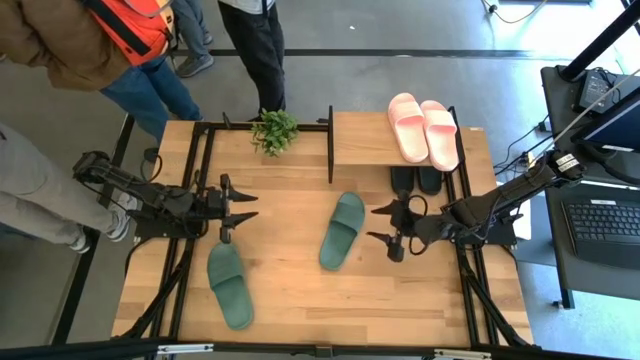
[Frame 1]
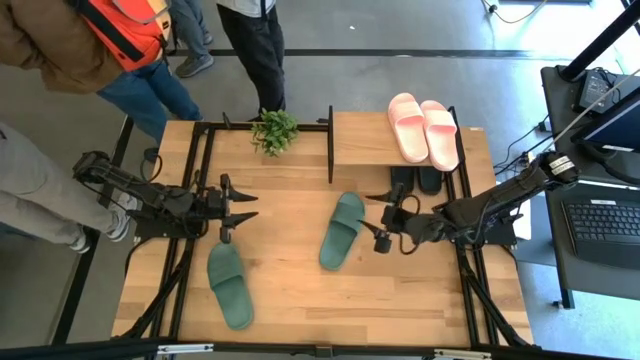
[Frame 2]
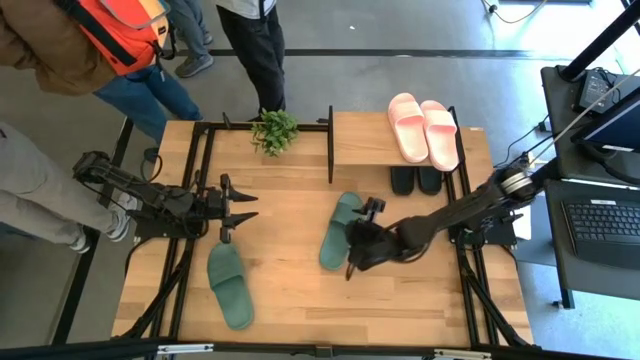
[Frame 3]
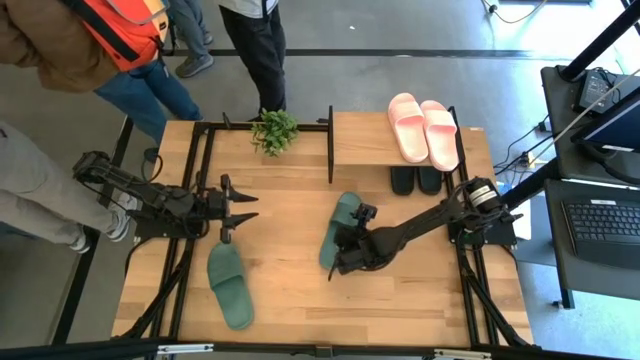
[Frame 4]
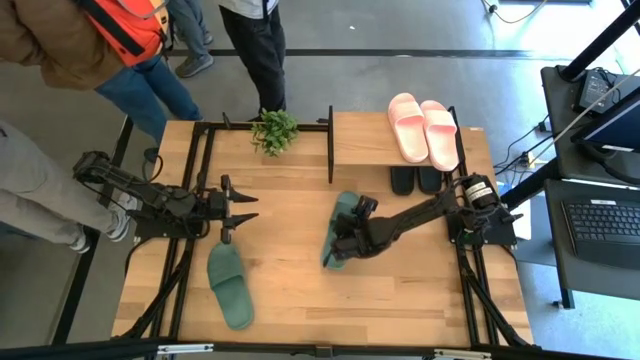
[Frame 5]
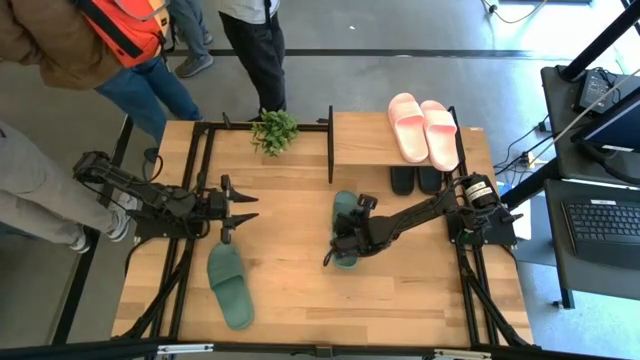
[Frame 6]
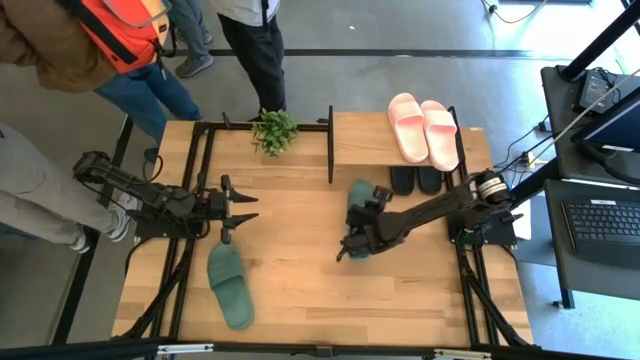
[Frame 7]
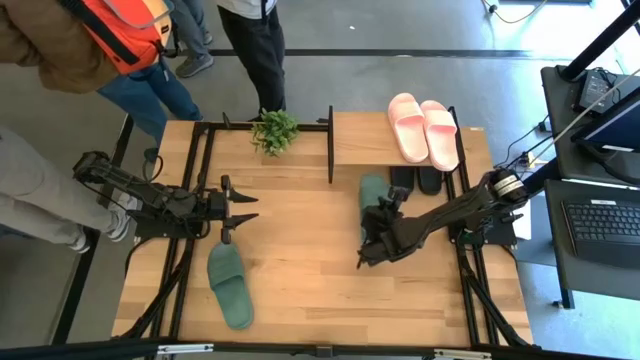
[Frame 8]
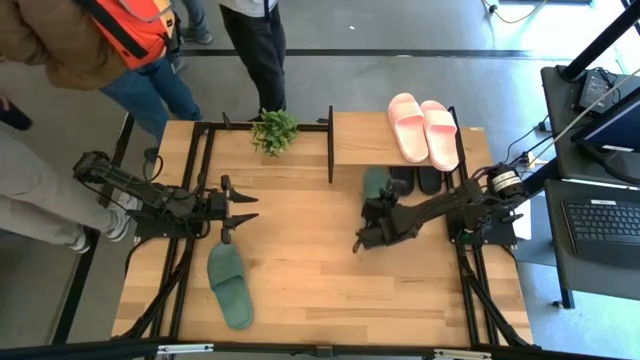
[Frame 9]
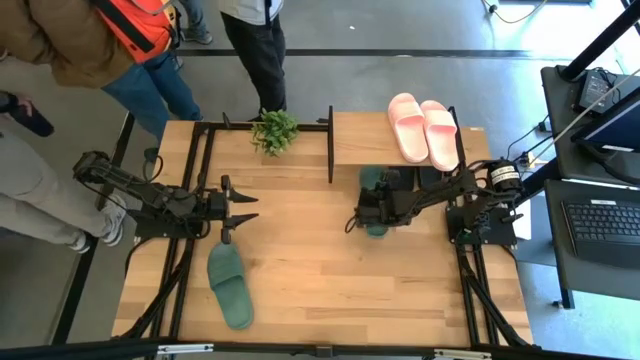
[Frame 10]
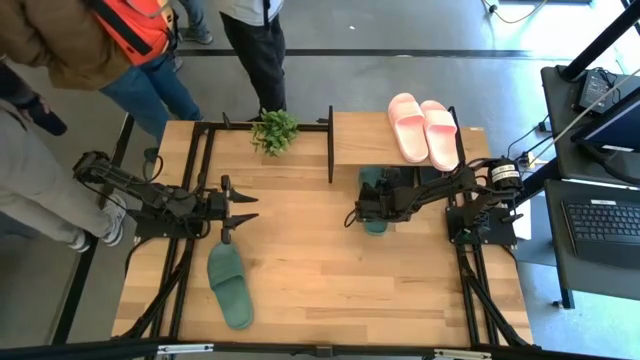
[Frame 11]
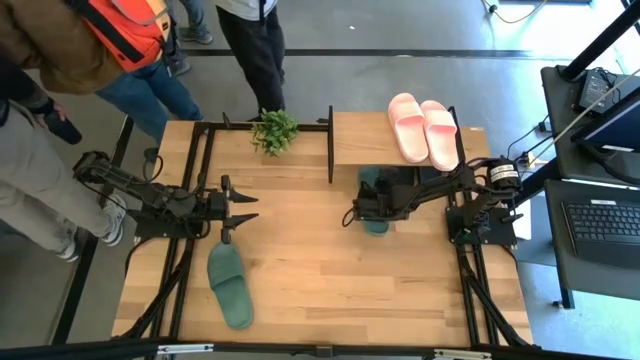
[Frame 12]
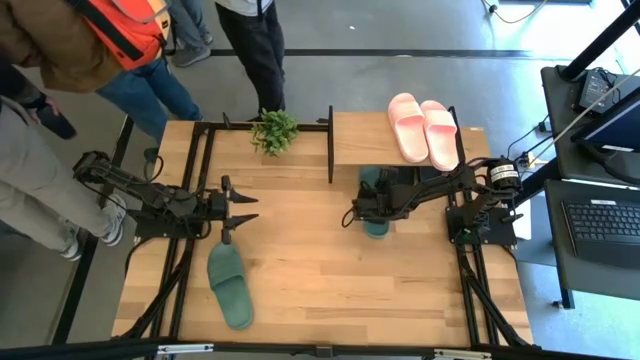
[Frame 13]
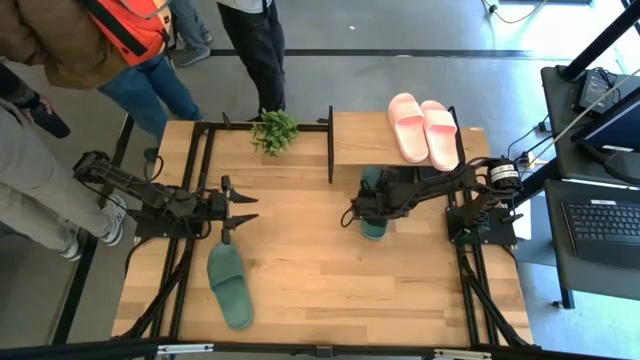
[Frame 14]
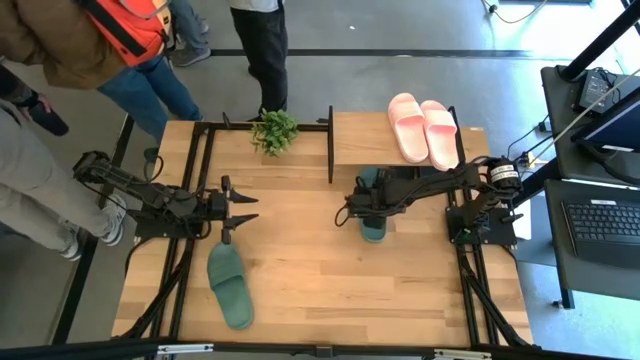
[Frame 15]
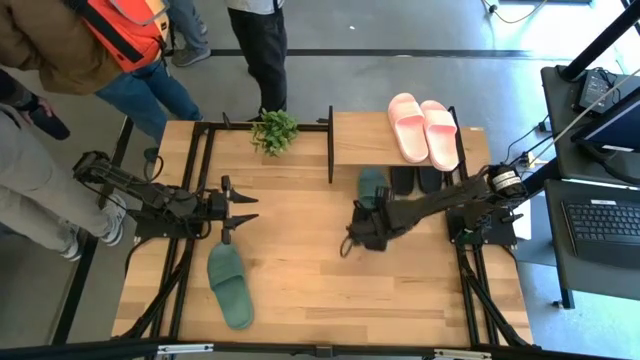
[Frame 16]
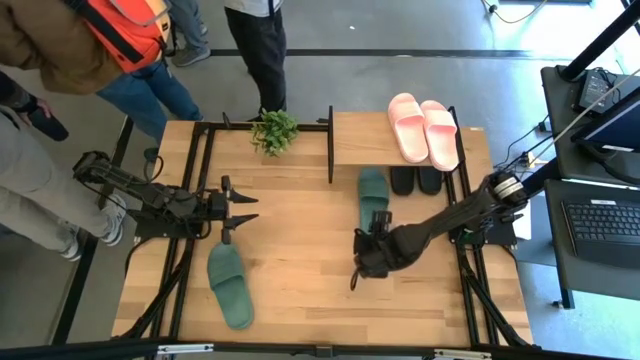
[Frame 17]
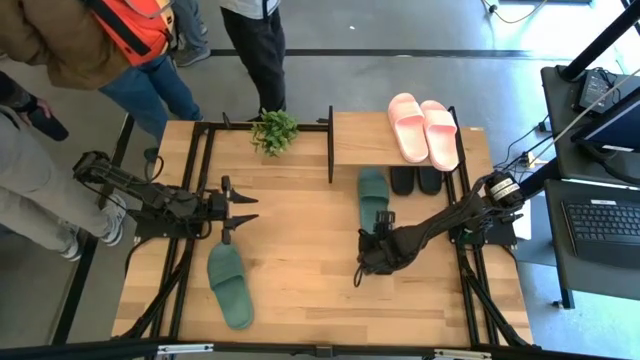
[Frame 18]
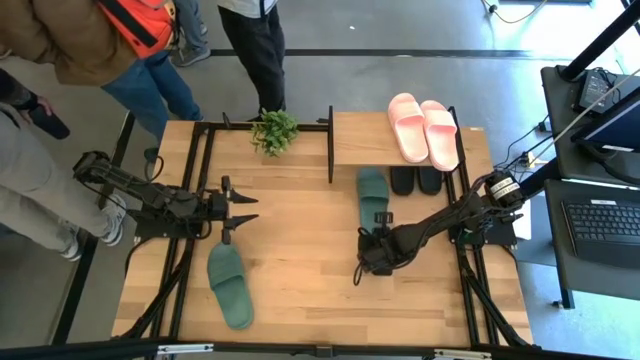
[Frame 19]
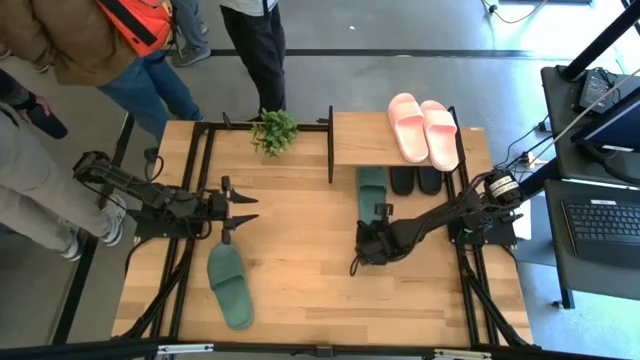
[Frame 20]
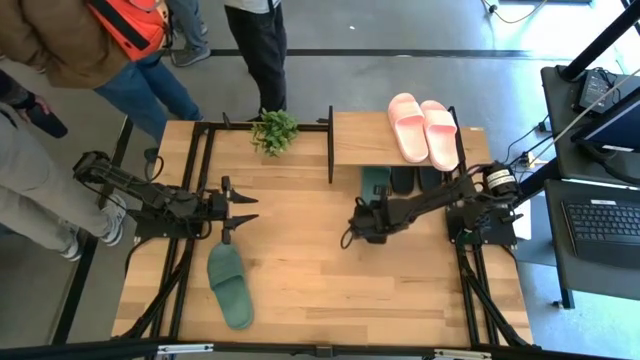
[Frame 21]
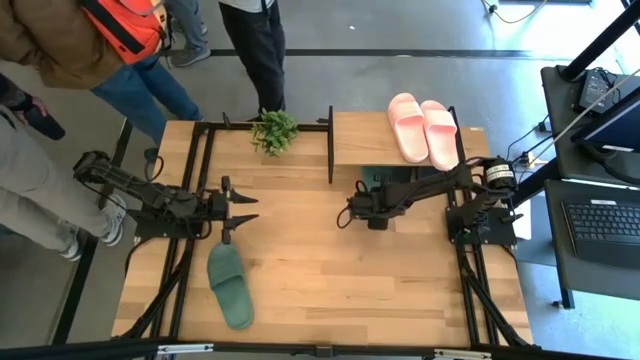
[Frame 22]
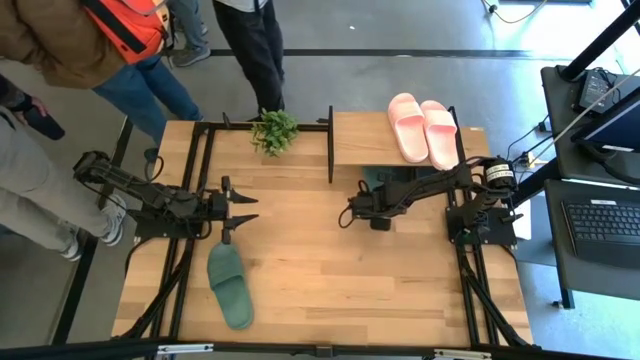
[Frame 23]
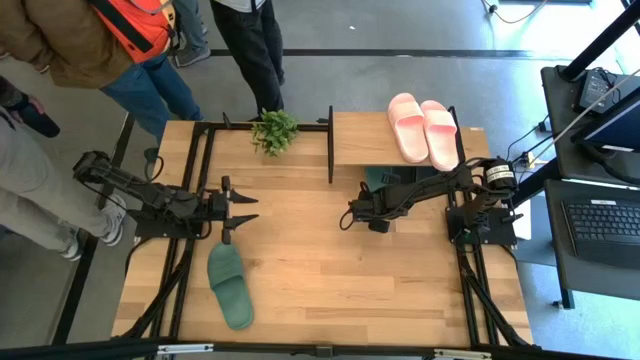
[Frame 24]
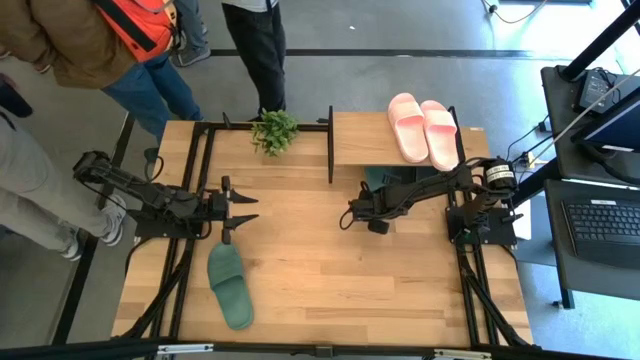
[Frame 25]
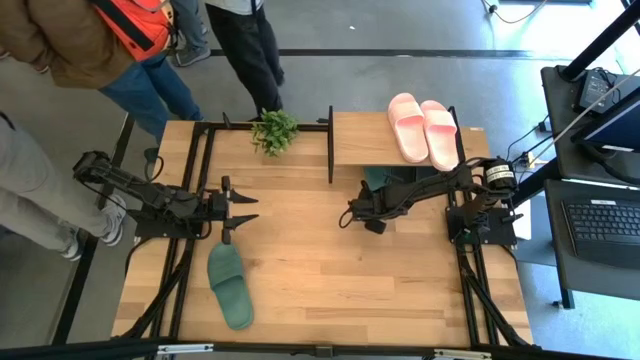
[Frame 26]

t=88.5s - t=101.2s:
Task: Pick and place slides into the shelf
Put the right green slide under the shelf

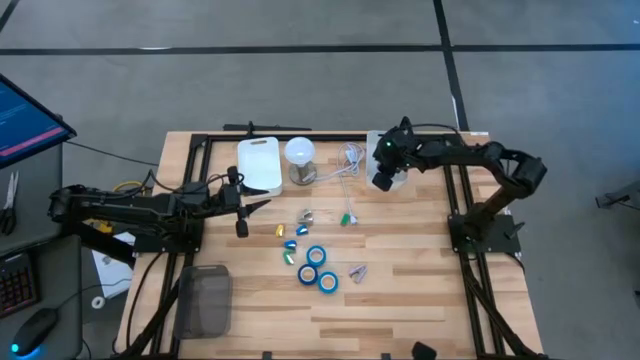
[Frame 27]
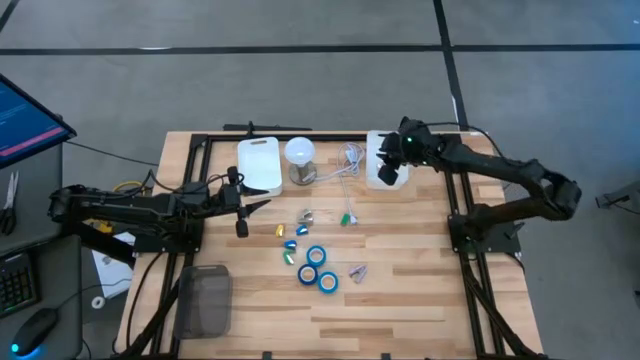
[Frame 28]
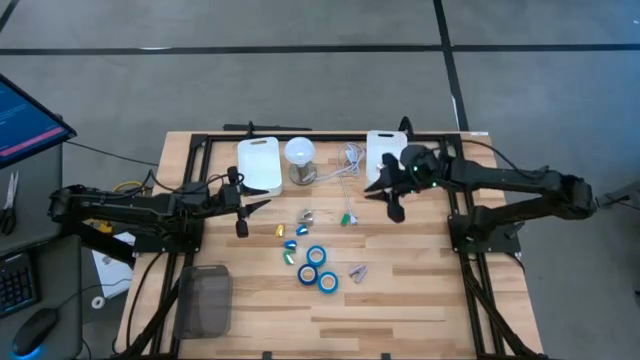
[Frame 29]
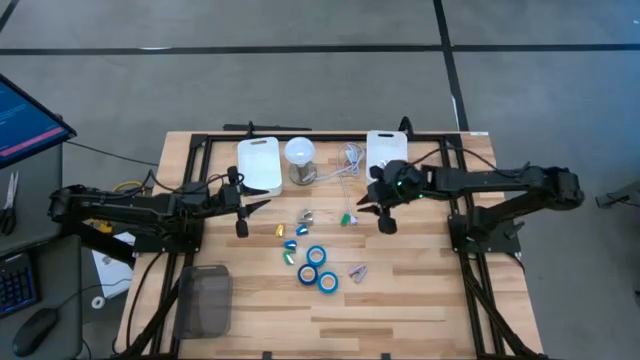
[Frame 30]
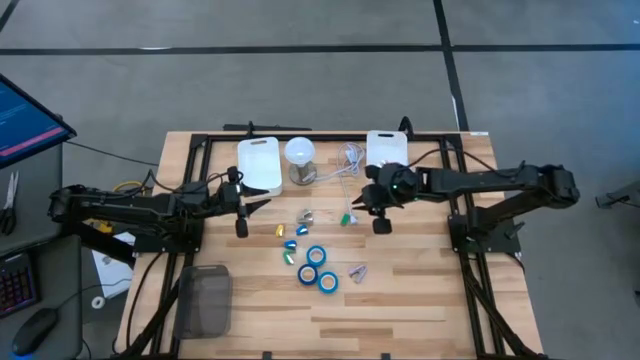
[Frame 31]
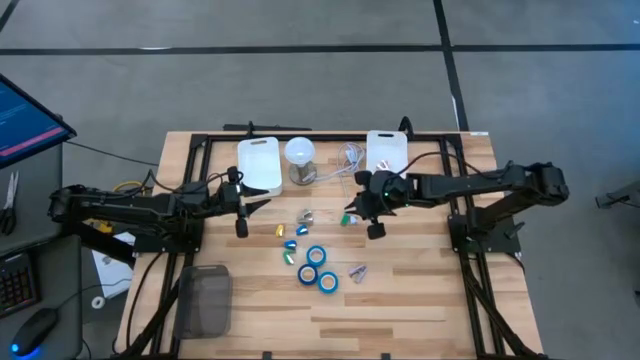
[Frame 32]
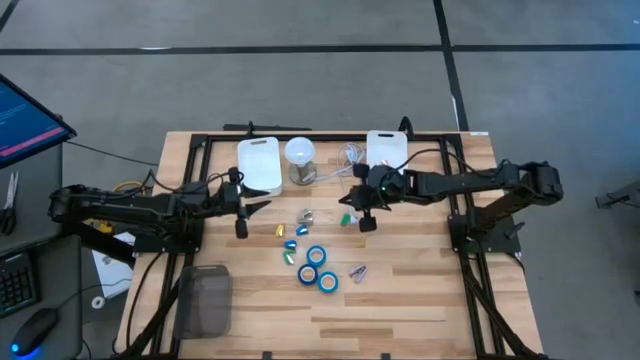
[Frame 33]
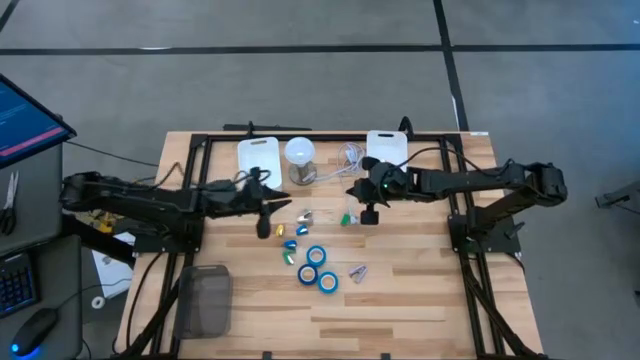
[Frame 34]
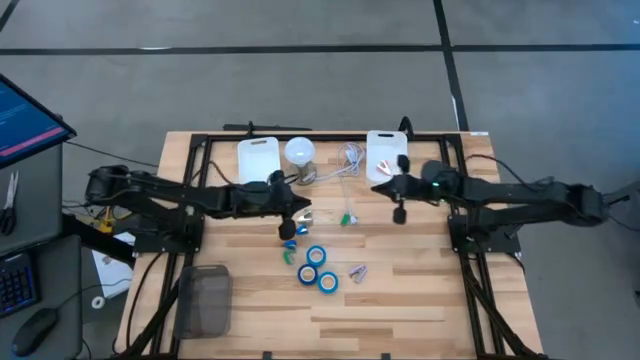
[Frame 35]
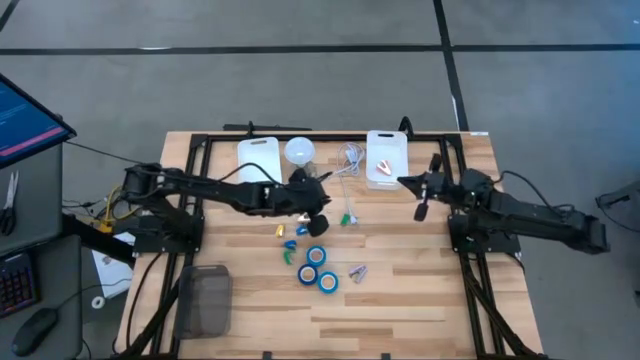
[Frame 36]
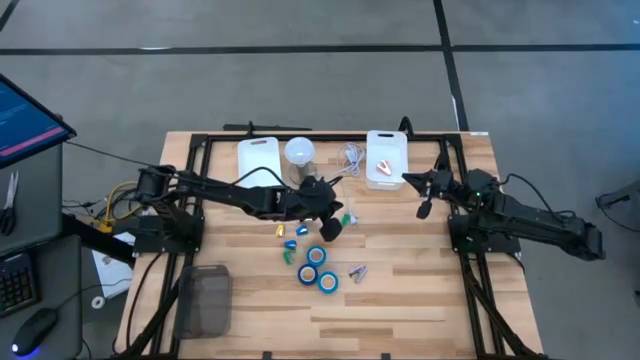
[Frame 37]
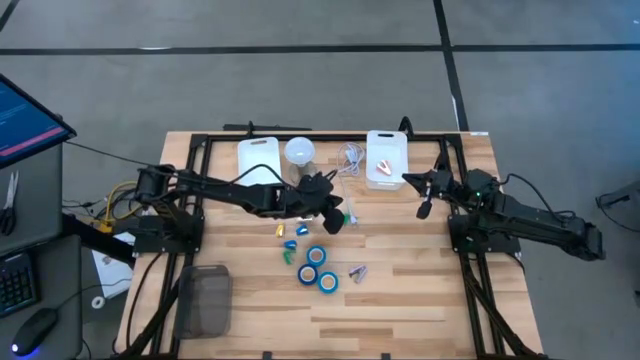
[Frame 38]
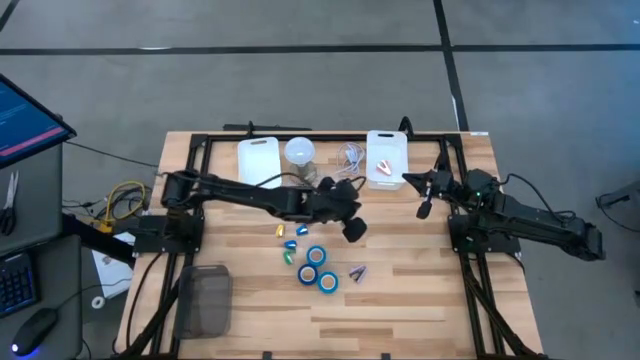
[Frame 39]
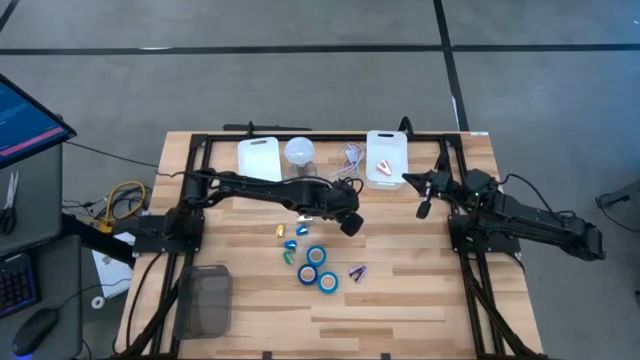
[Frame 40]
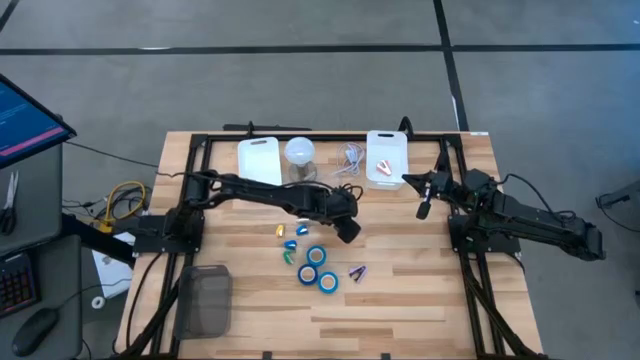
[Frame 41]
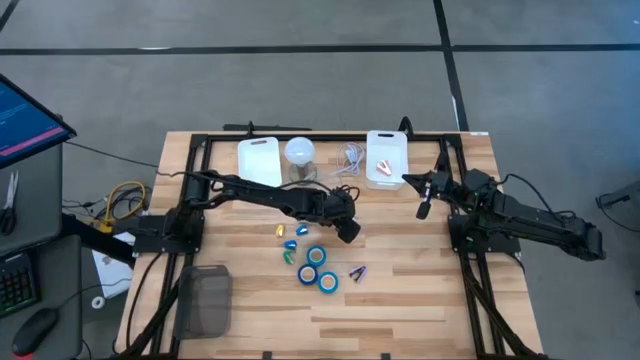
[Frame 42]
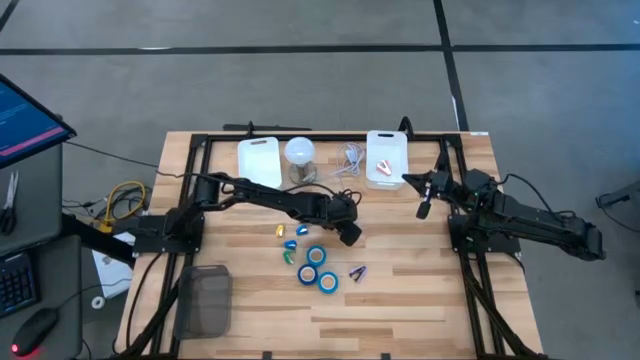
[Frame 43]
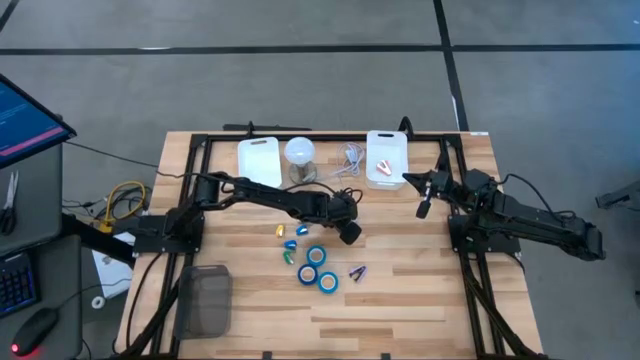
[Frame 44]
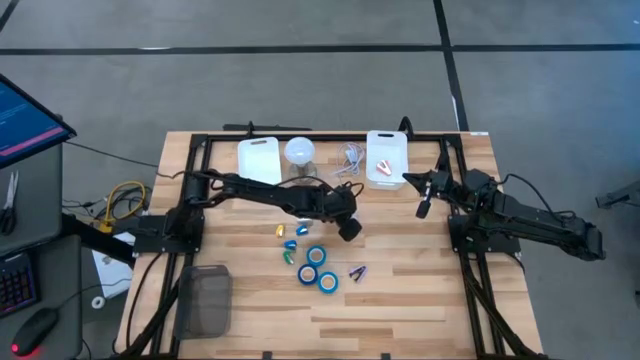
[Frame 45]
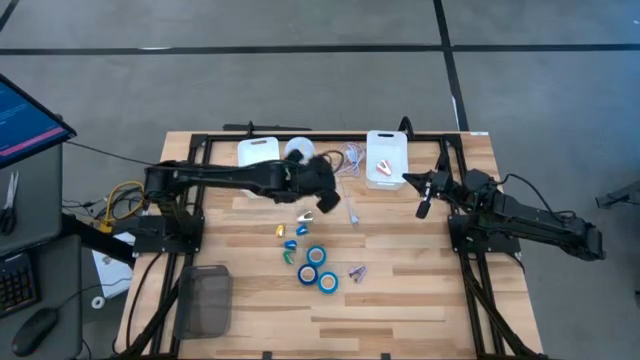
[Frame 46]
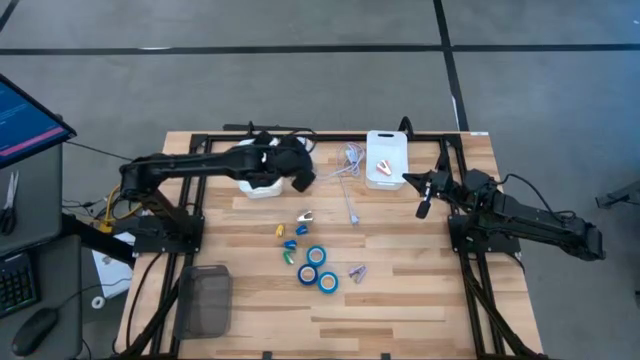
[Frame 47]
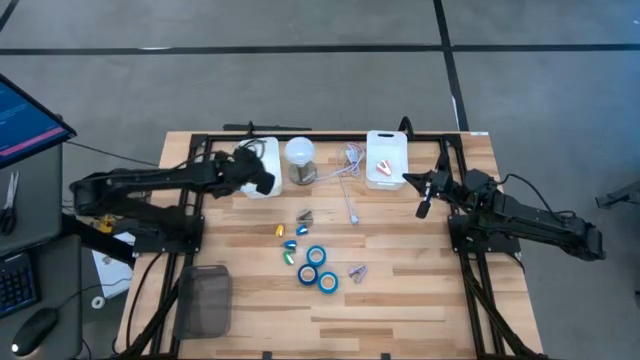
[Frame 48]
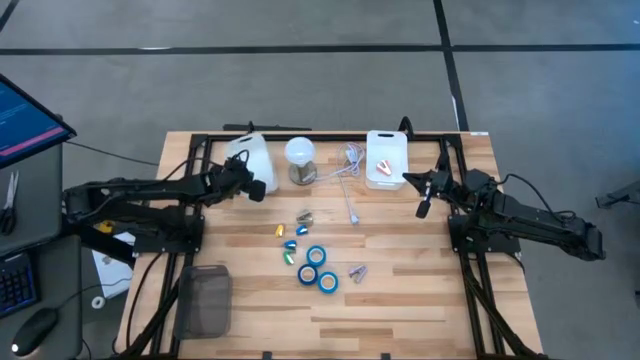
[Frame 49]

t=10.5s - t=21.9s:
Task: Pick and place Stapler, Stapler remover, tape
Put the top green stapler into the left white bin
